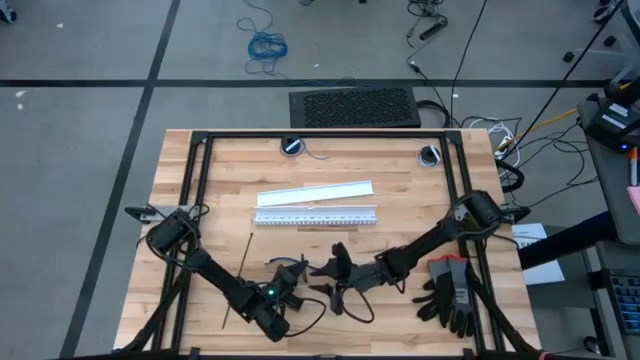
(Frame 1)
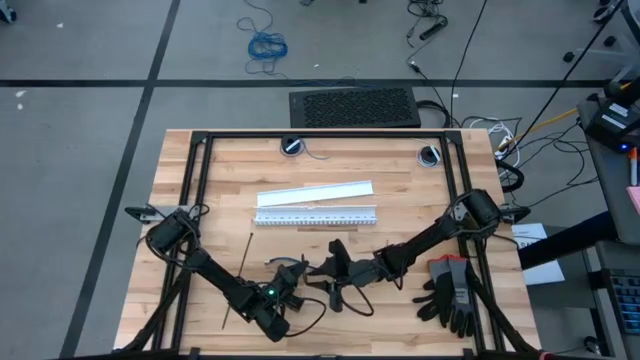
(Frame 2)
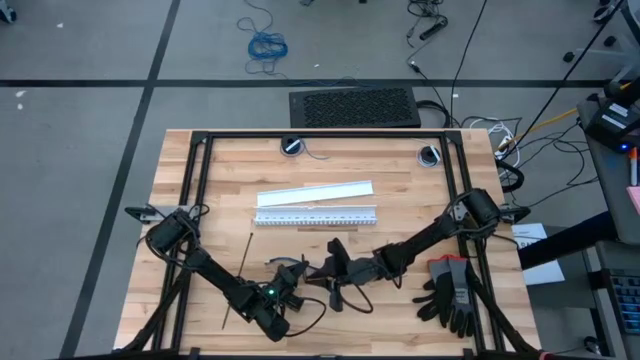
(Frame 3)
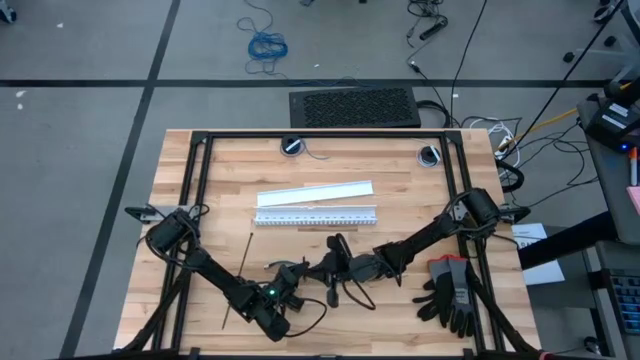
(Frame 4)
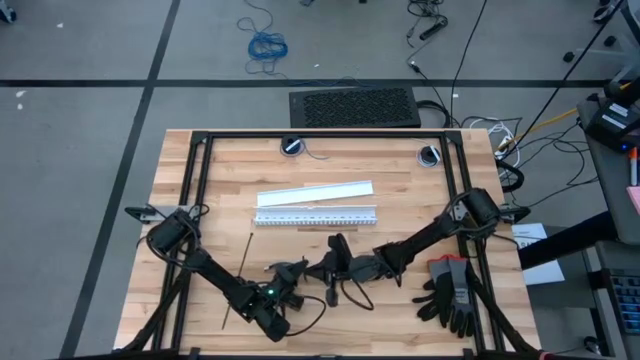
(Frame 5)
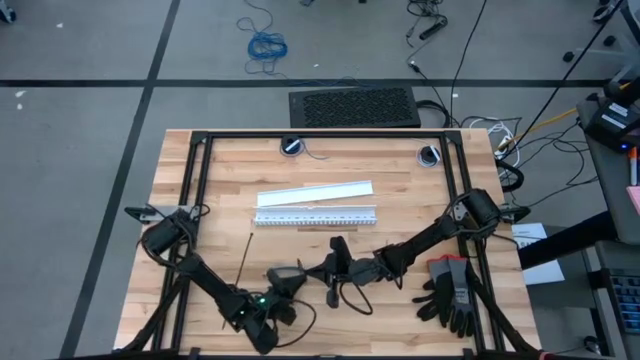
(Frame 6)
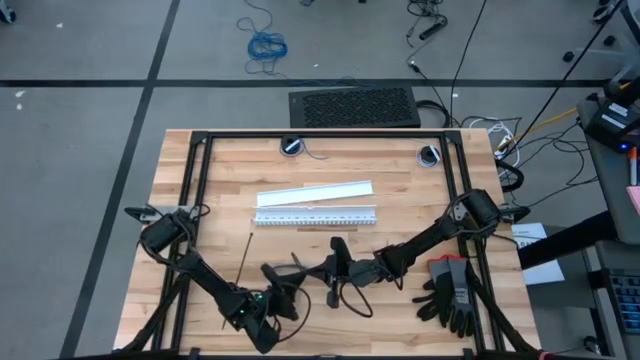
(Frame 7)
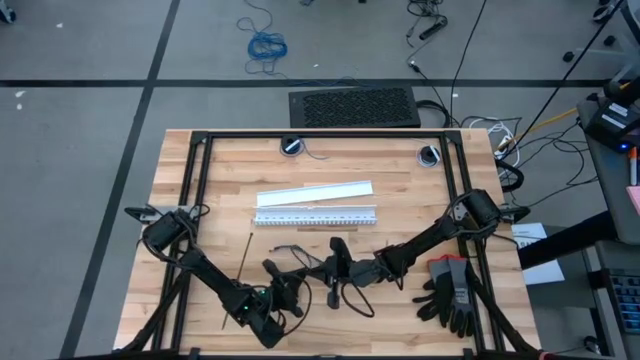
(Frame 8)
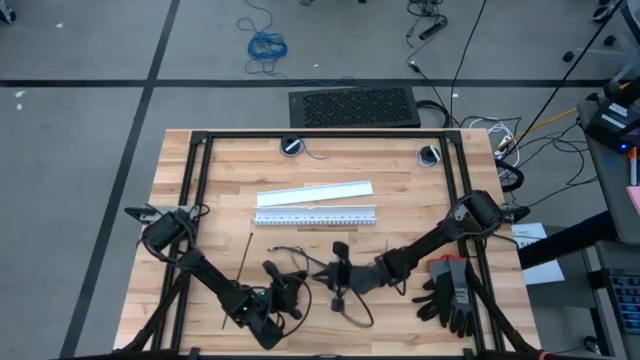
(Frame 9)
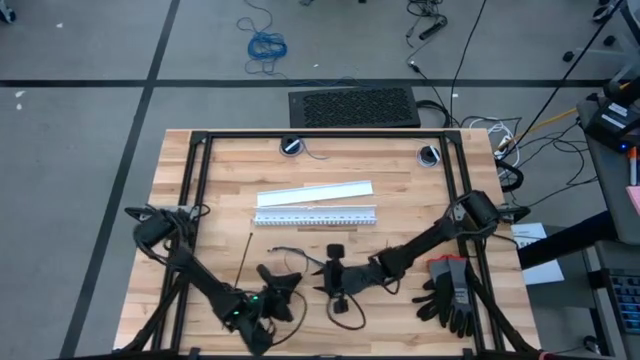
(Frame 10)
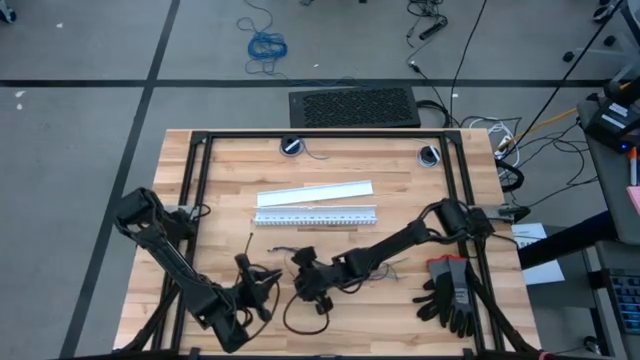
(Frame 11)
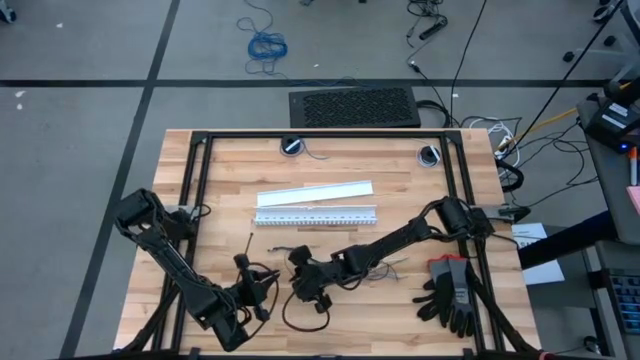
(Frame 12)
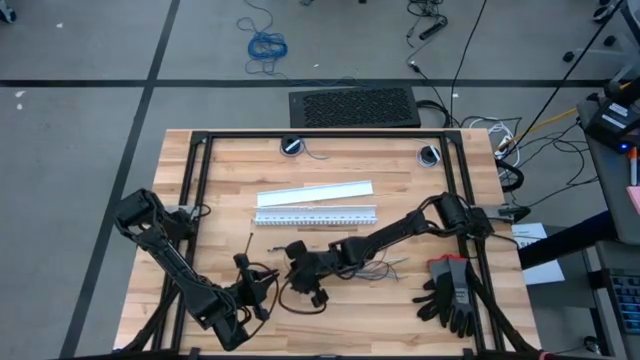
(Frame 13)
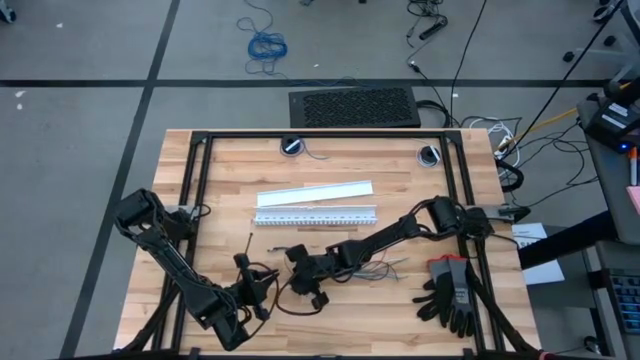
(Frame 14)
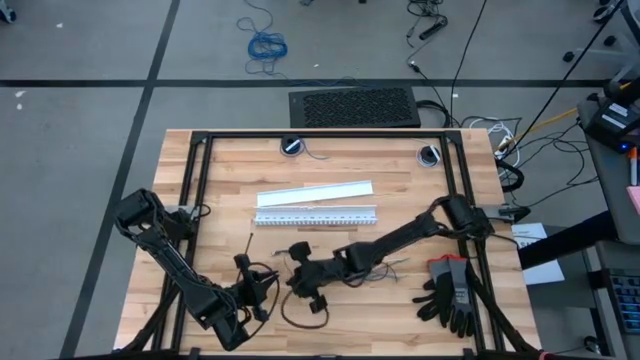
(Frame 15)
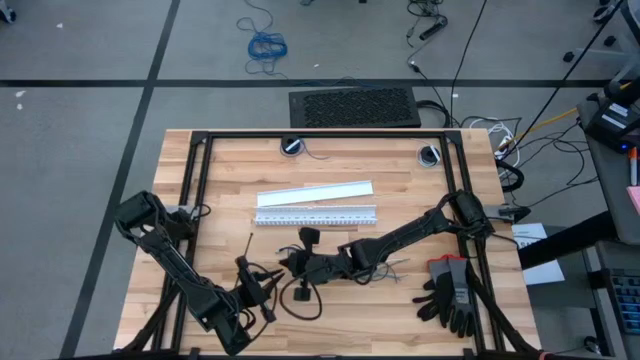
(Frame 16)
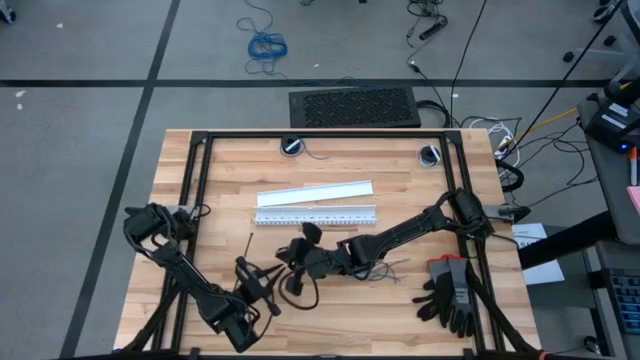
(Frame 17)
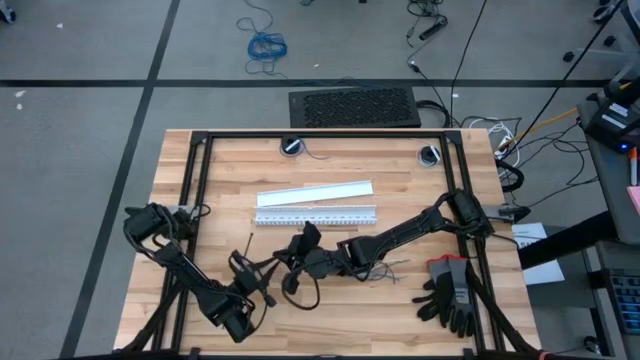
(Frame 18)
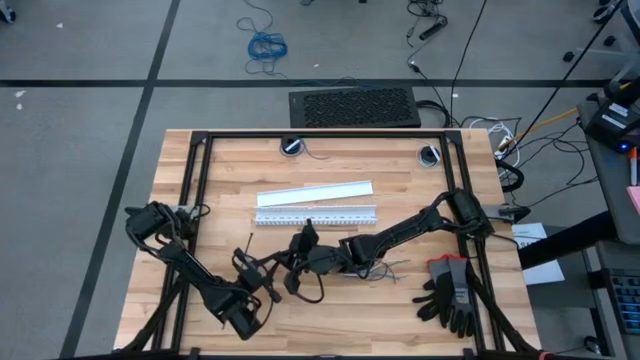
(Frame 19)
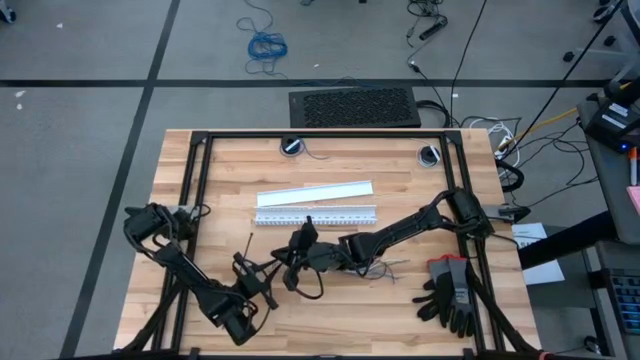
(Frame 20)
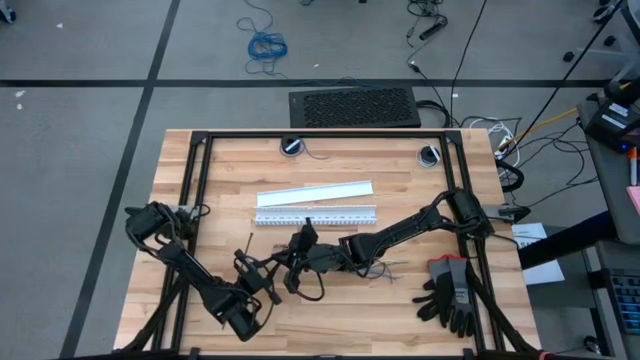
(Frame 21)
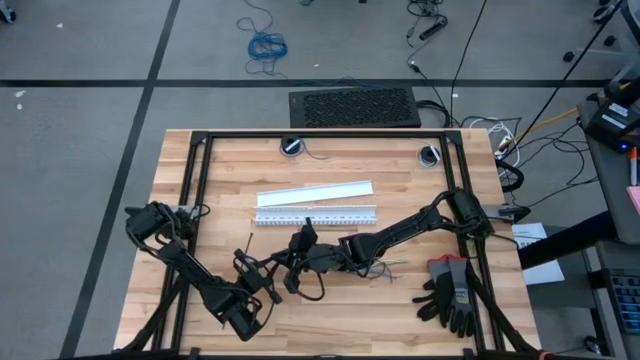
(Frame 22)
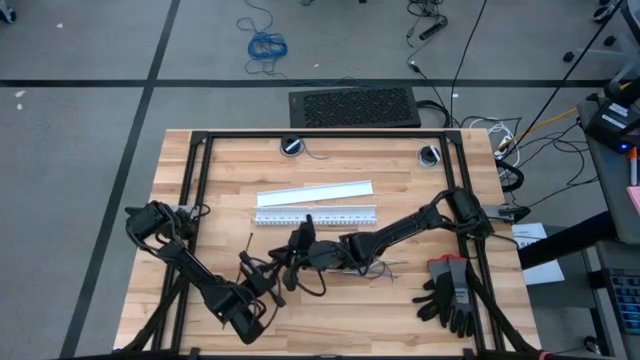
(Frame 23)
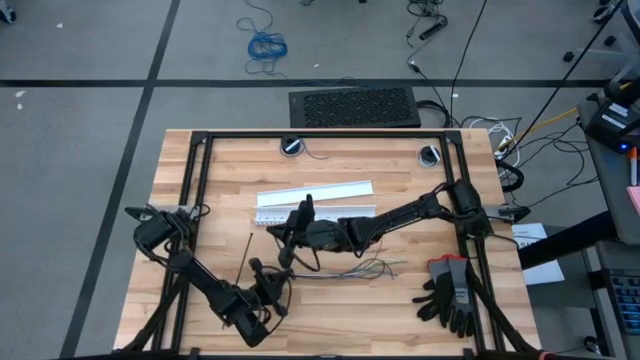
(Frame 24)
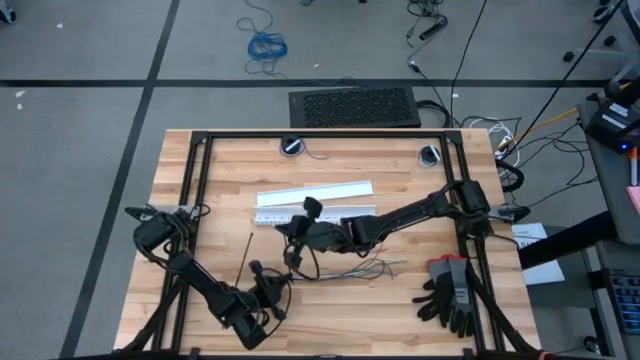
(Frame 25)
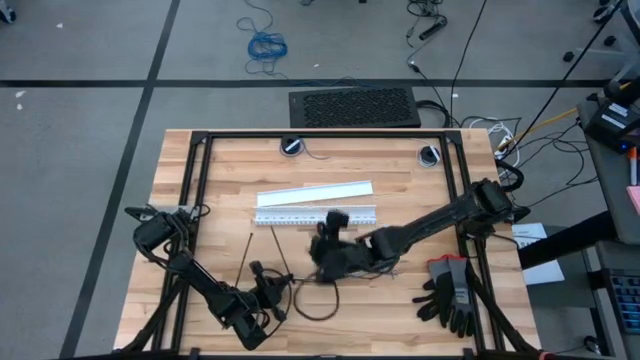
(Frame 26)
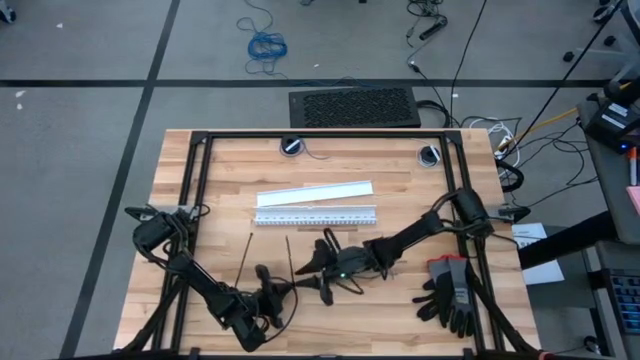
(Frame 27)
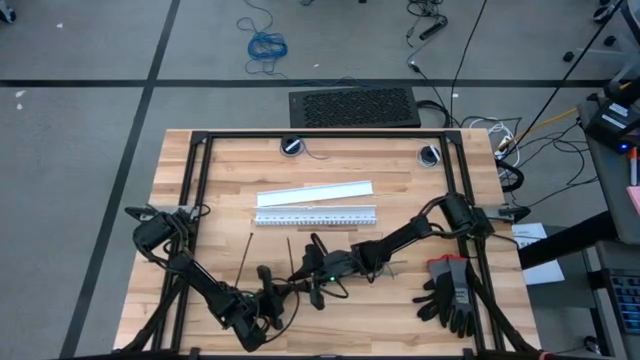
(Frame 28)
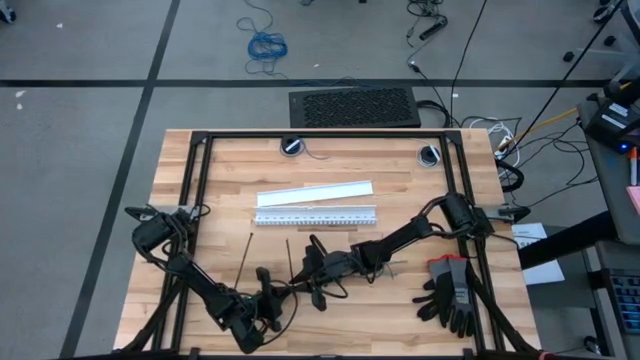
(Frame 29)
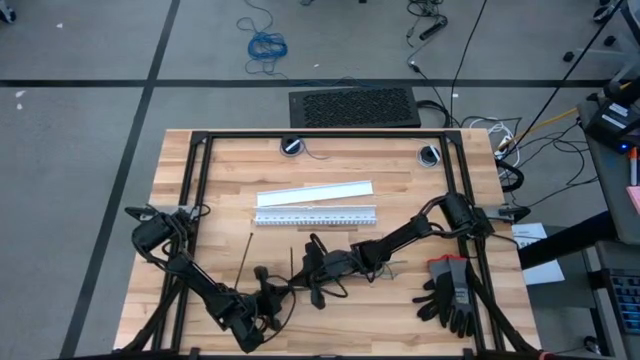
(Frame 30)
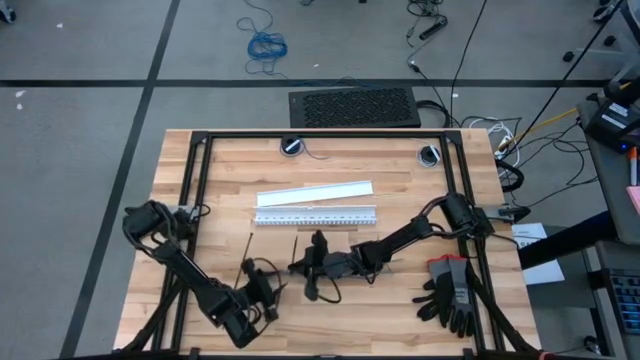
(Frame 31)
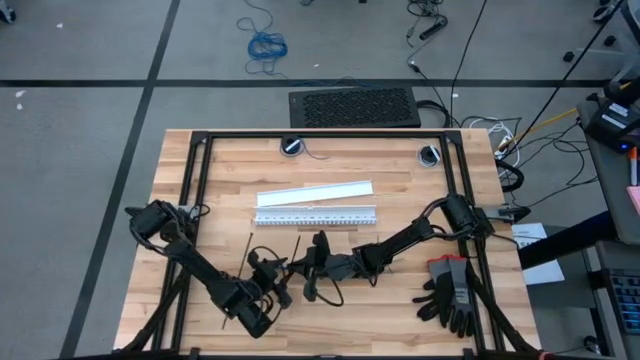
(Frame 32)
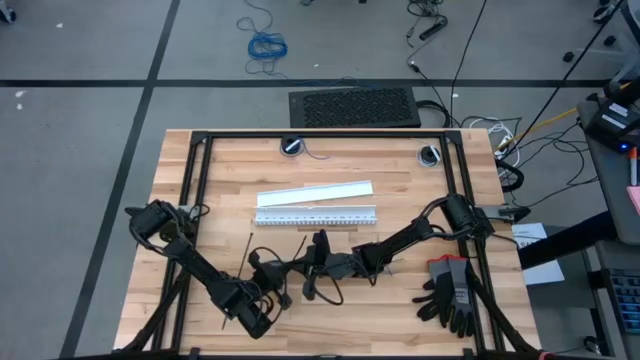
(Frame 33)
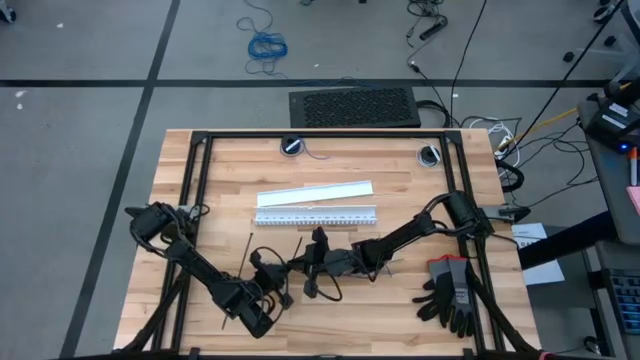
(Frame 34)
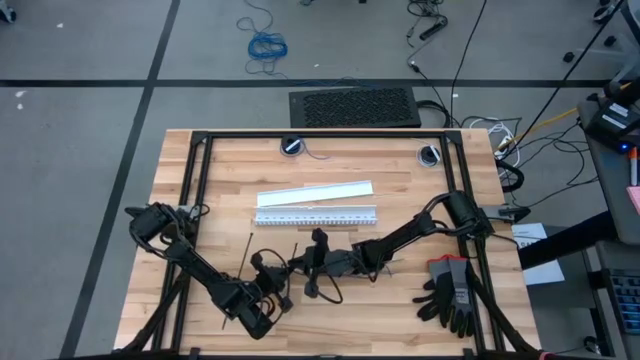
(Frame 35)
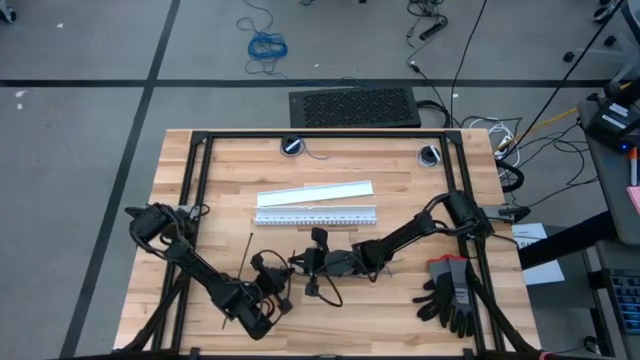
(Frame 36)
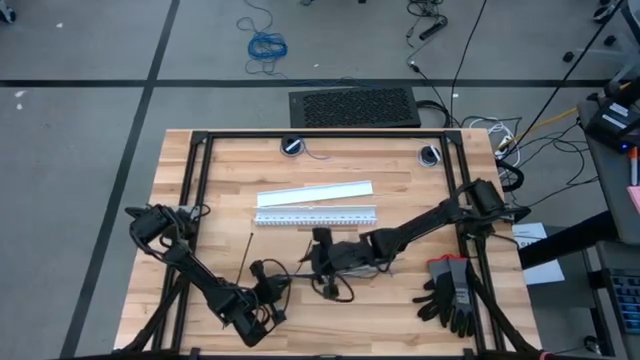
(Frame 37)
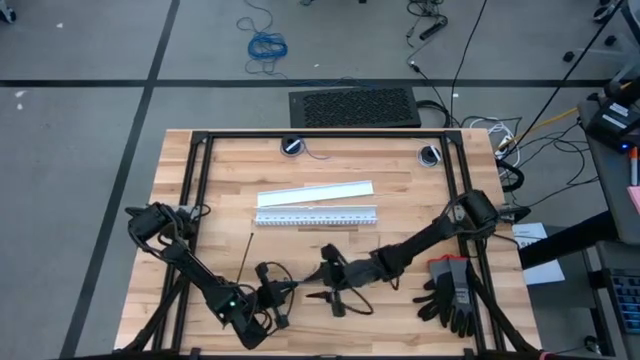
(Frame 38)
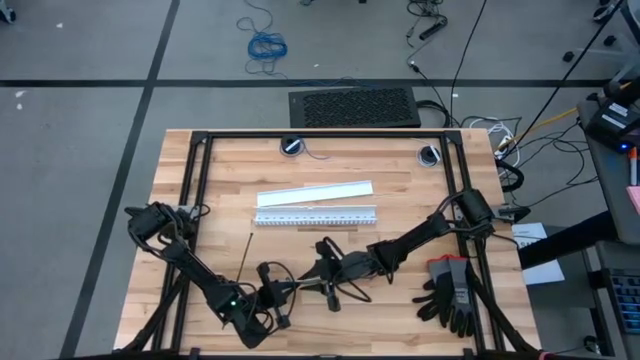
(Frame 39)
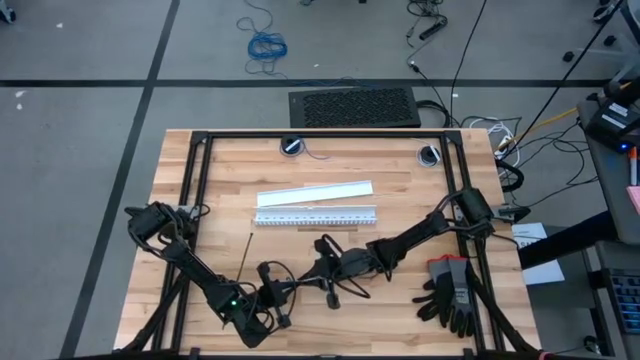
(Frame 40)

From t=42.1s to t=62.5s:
Task: Ziptie cables
Wrap the left black zip tie around the colored cable wires

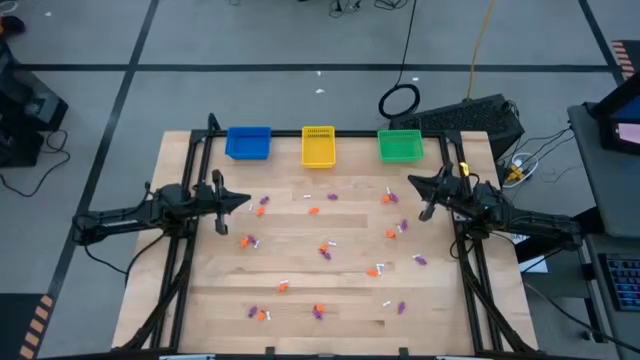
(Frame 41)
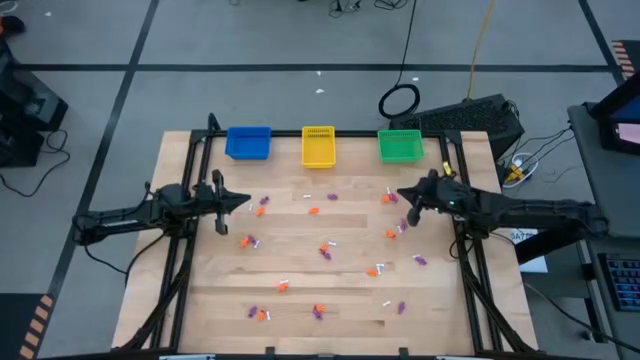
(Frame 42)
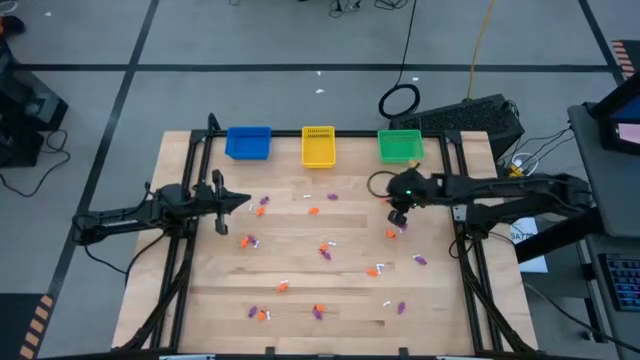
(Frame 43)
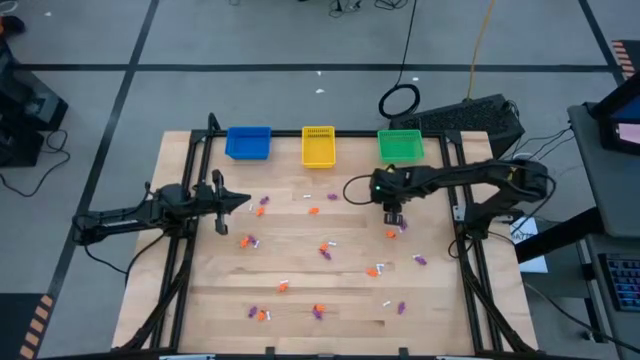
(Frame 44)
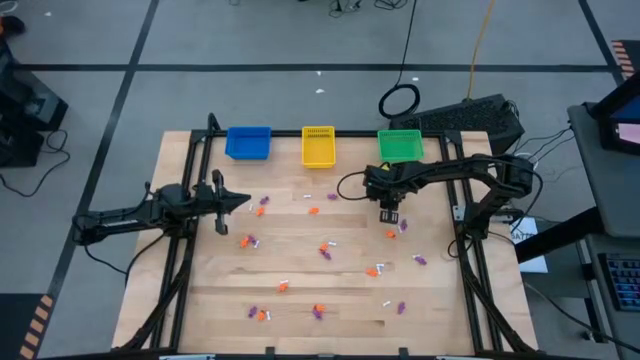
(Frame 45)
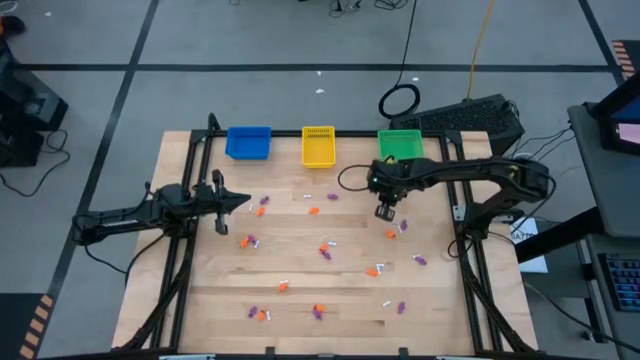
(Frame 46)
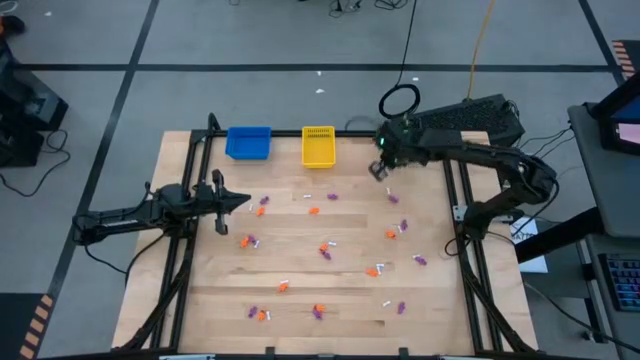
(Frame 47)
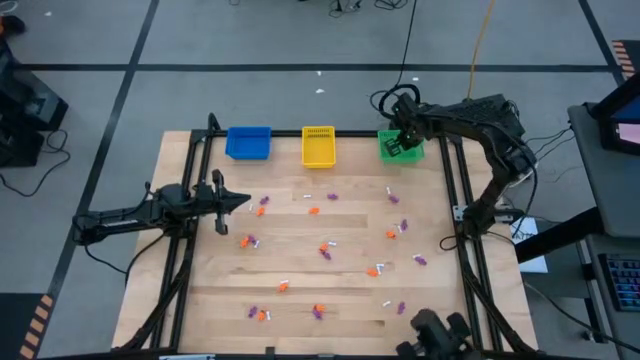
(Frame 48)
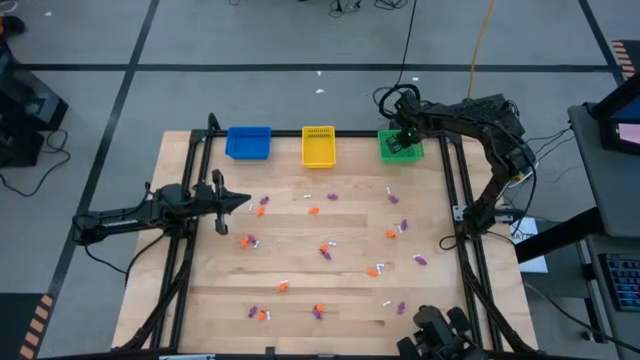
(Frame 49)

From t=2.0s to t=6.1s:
Task: Sort Halloween decoration
Put the orange skeleton toy into the green bin
